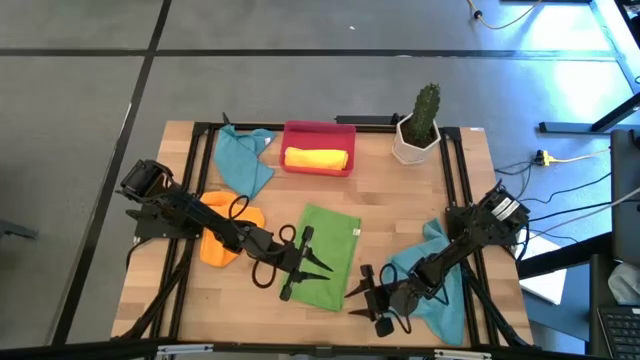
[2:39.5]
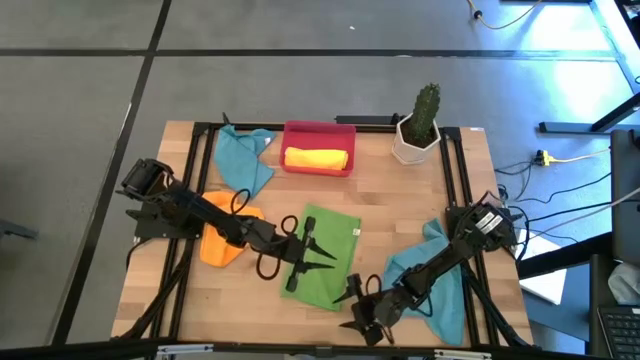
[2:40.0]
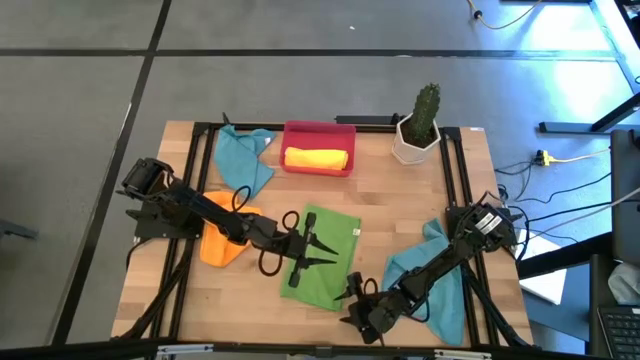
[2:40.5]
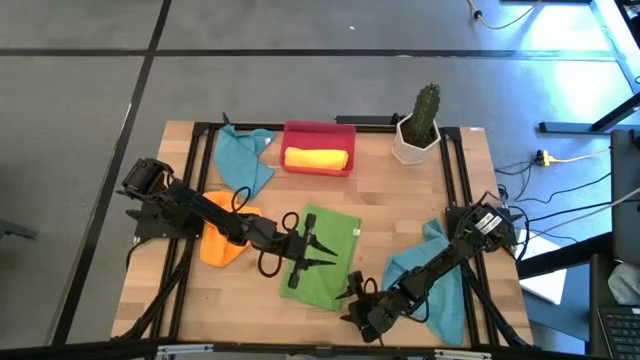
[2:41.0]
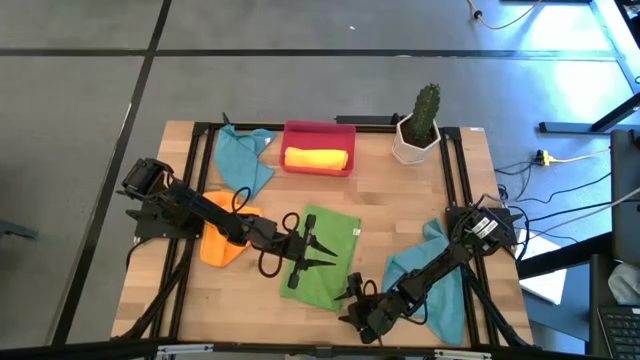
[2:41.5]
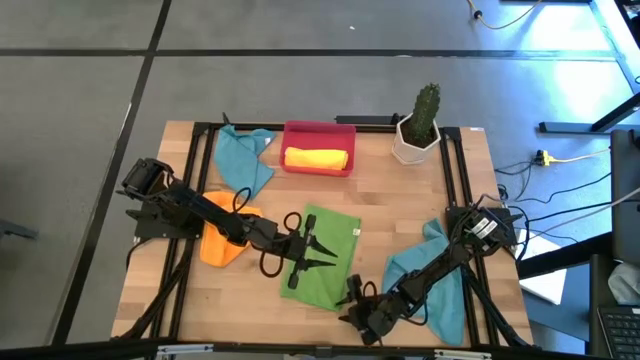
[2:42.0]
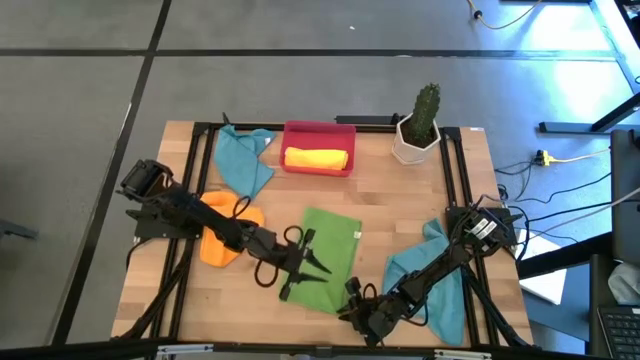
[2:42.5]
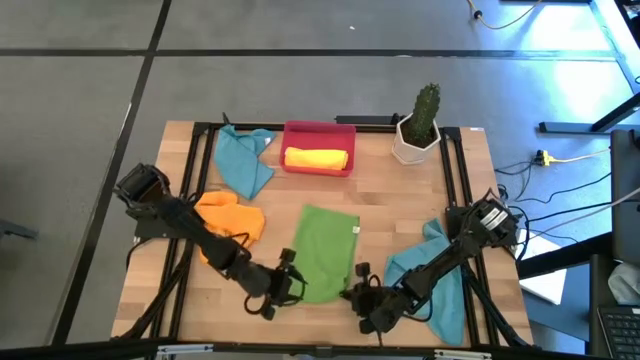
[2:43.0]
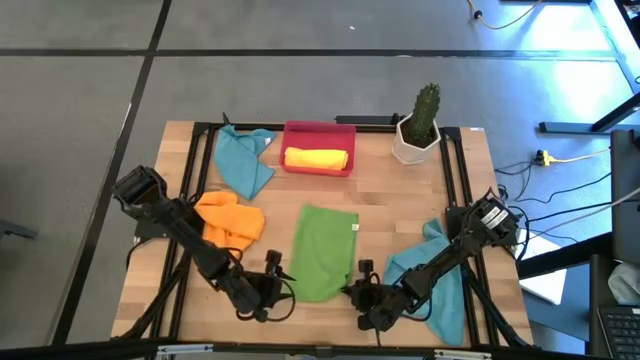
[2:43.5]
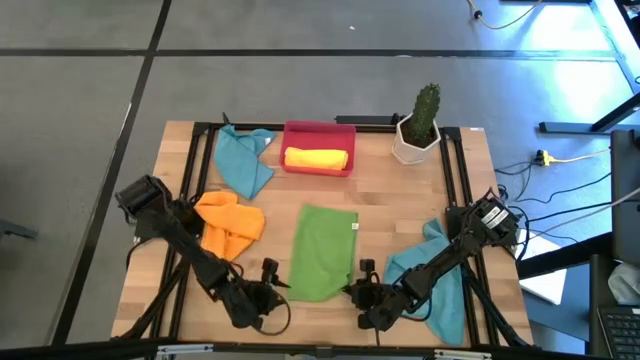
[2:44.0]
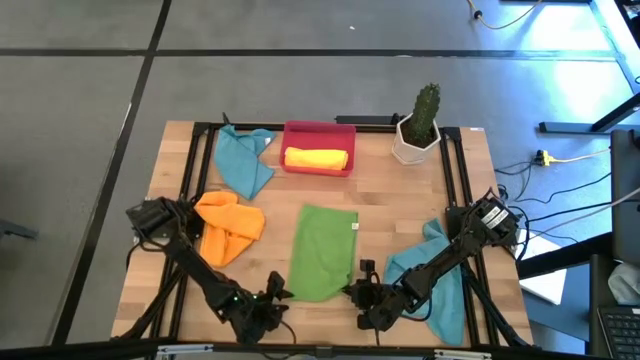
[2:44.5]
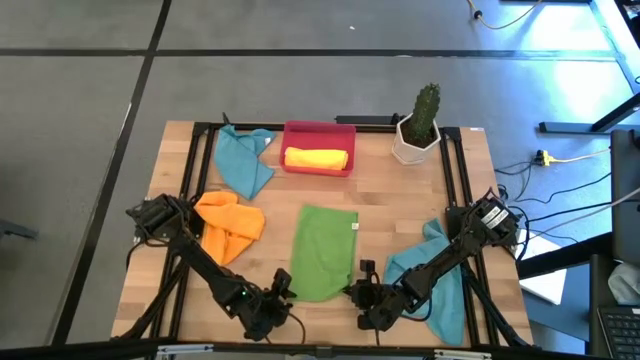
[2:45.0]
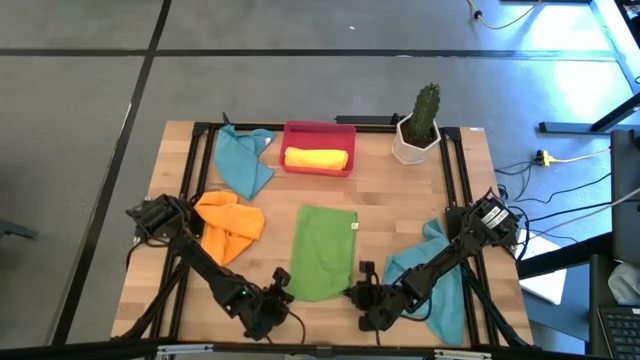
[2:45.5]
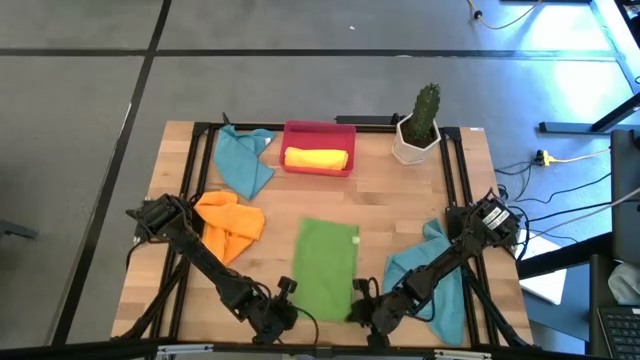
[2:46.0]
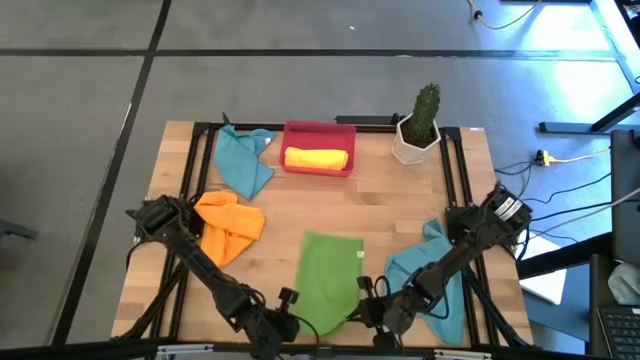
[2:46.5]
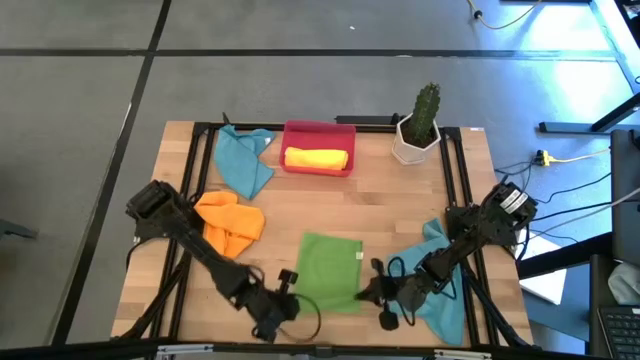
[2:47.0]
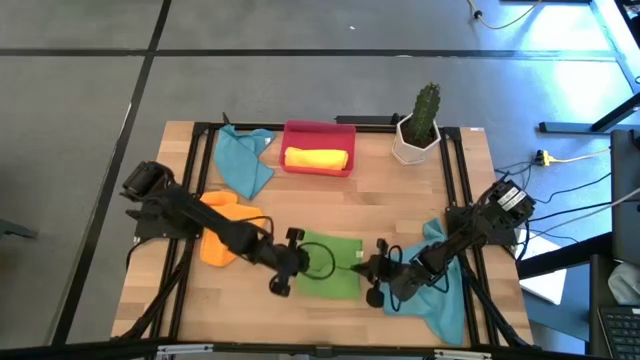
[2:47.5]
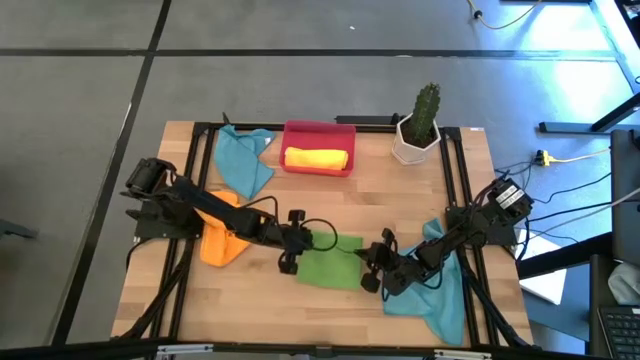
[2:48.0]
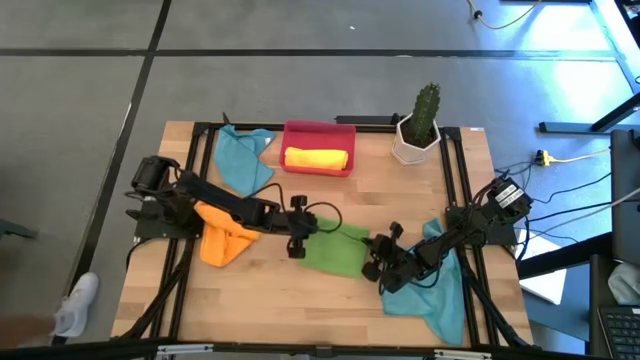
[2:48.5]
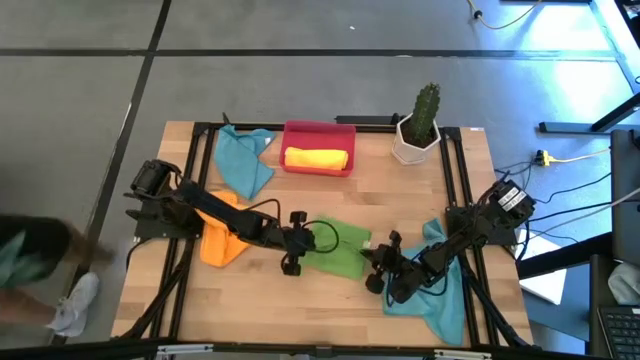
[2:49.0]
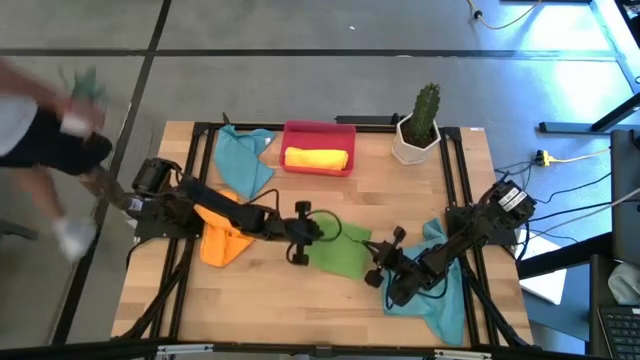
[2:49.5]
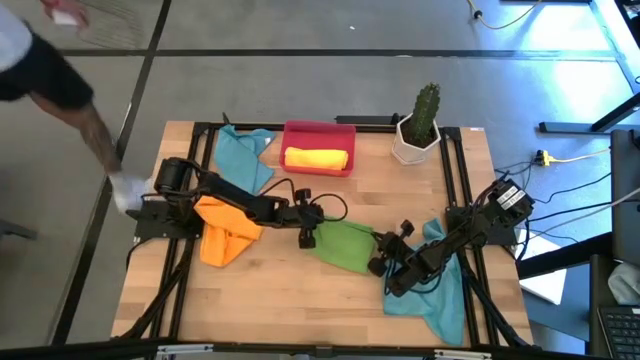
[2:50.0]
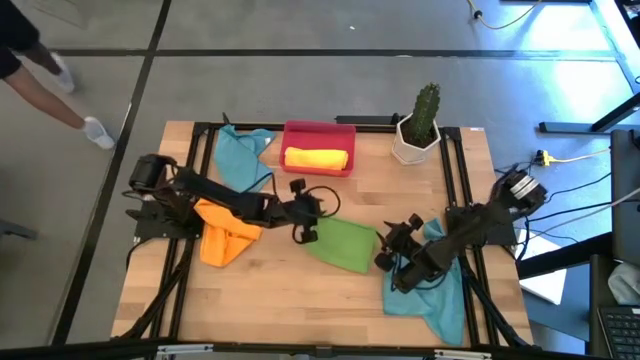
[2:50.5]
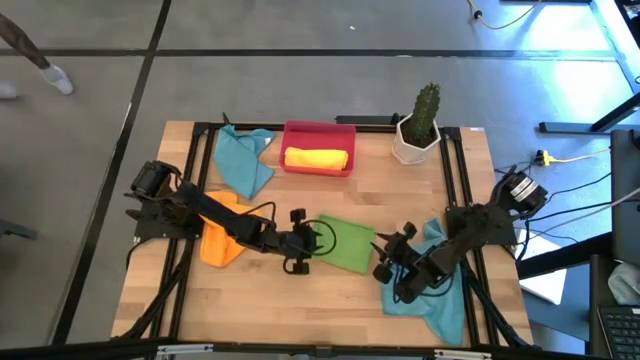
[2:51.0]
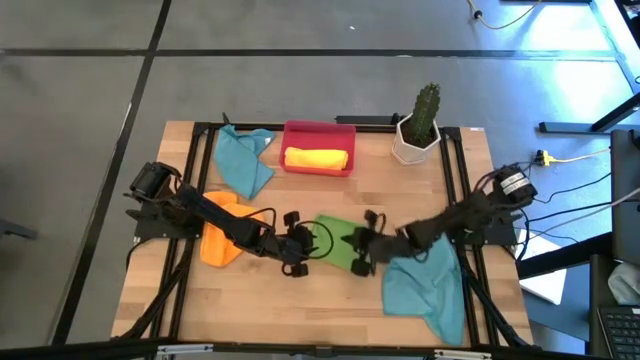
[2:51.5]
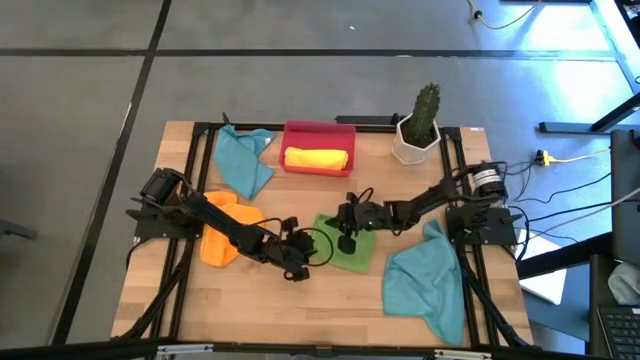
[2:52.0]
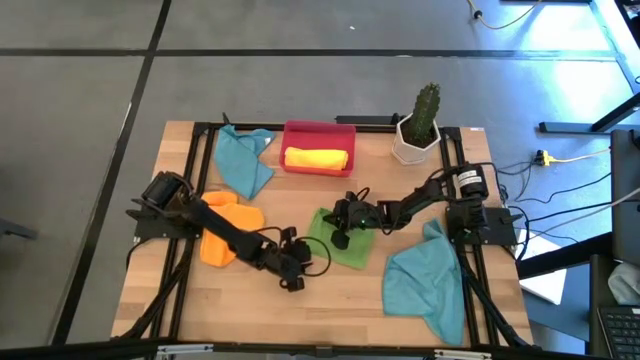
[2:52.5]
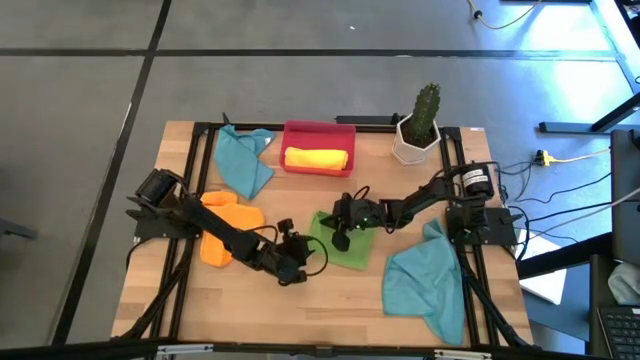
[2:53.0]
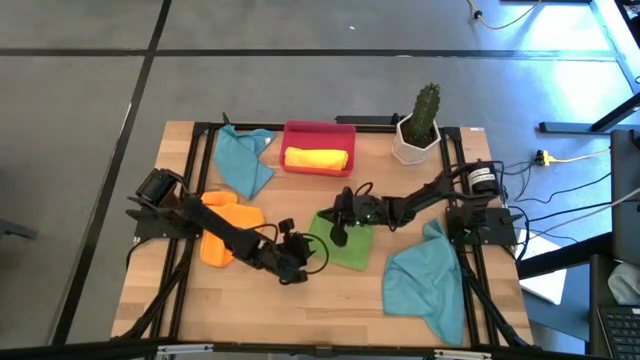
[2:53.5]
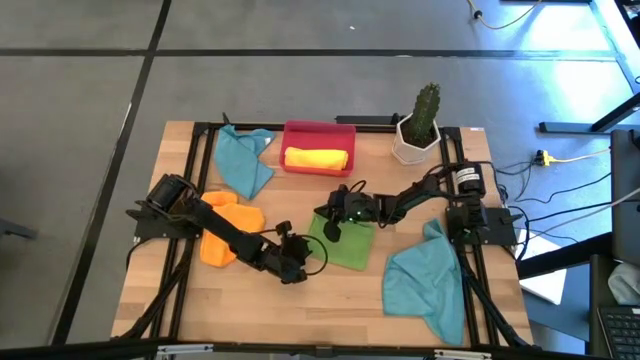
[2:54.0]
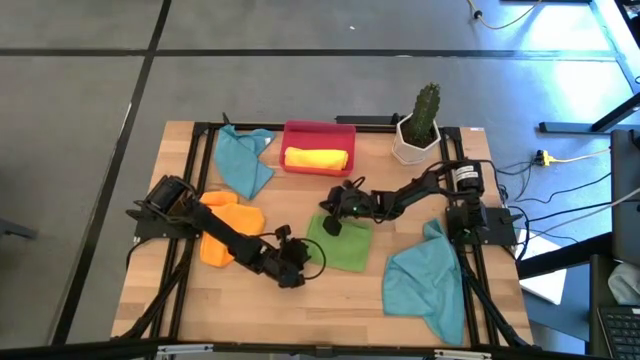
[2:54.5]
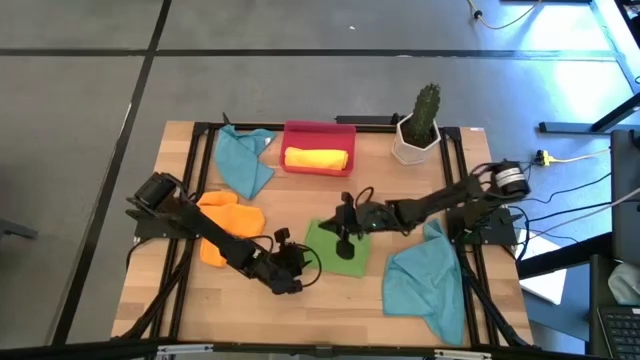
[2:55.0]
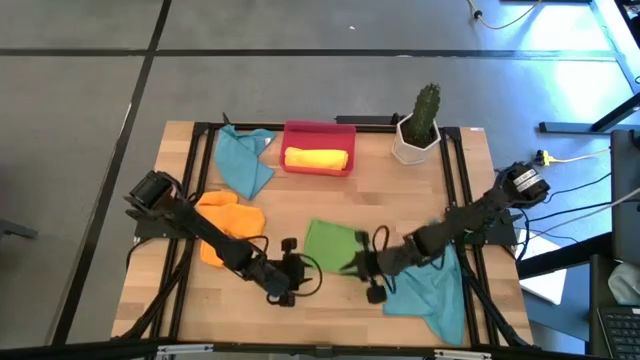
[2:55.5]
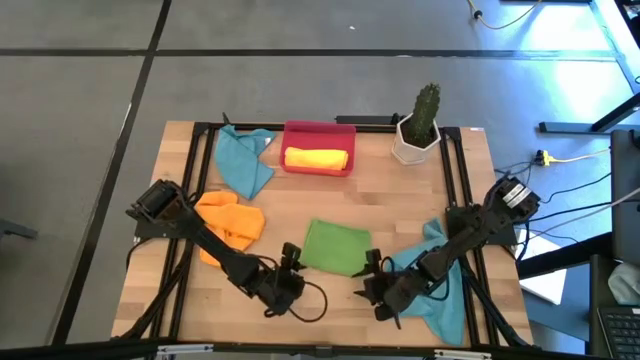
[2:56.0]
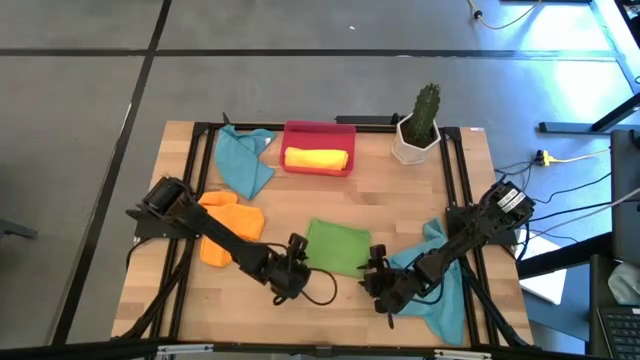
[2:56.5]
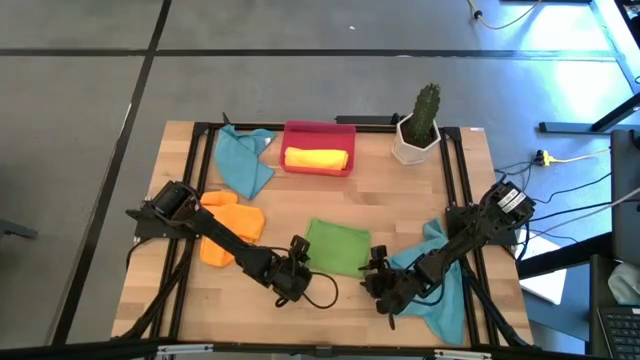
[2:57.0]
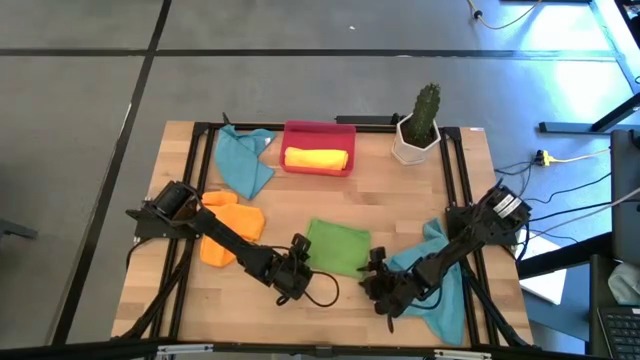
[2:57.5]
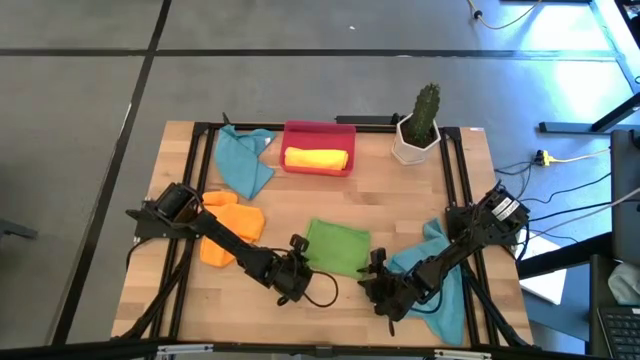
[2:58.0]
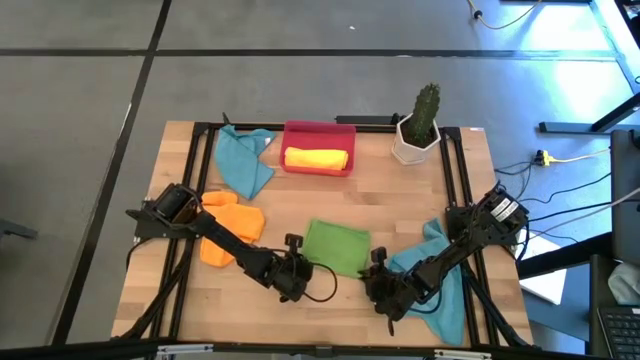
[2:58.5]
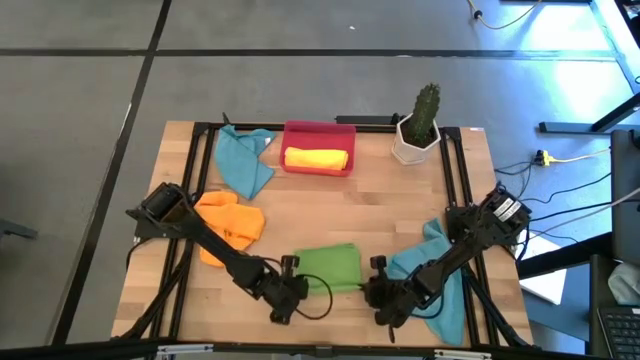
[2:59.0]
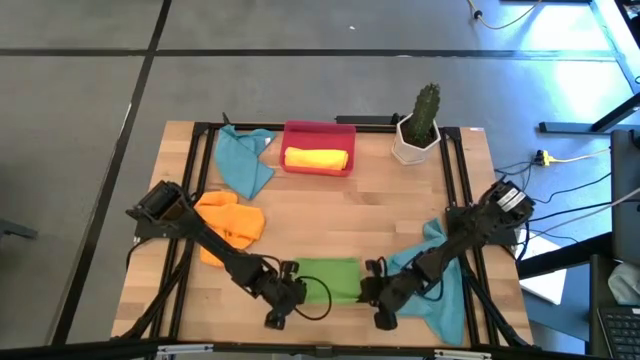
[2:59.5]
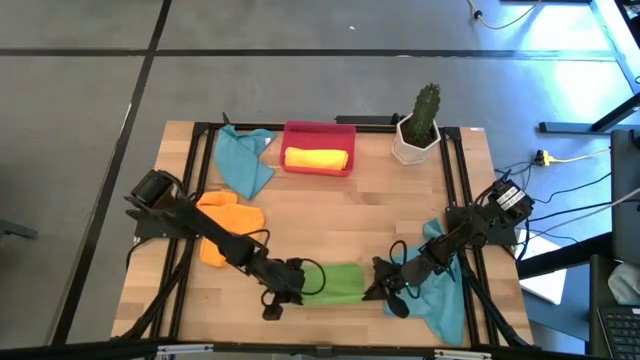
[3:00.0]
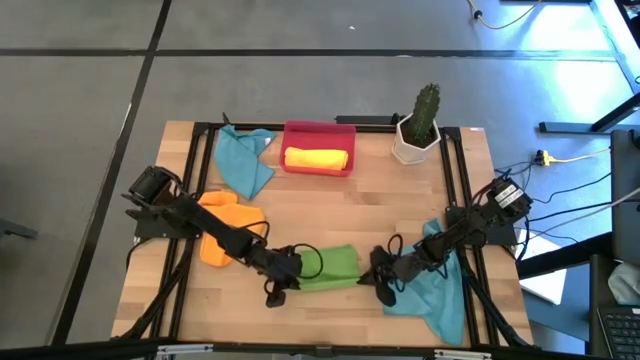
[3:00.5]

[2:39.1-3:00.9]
Task: Roll microfiber towels into tight, uniform cylinder then place into a basket
Roll the green towel
